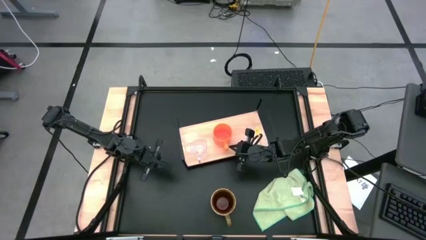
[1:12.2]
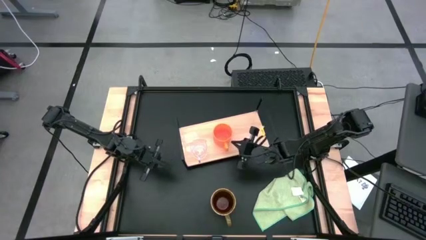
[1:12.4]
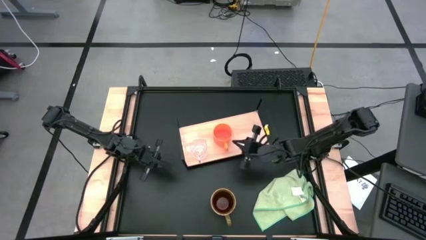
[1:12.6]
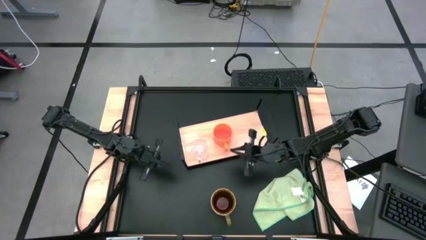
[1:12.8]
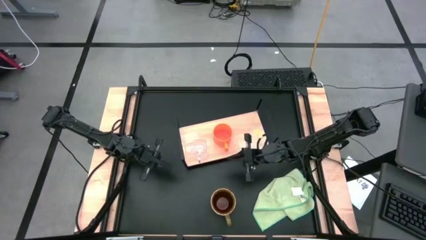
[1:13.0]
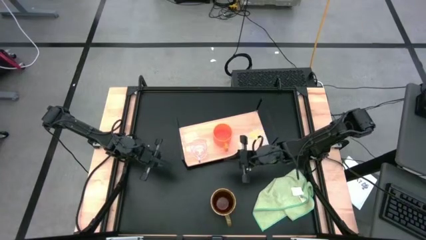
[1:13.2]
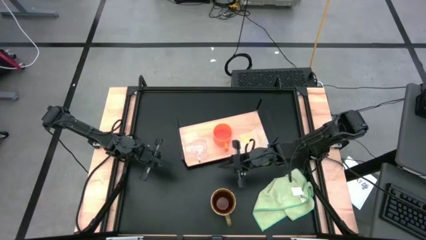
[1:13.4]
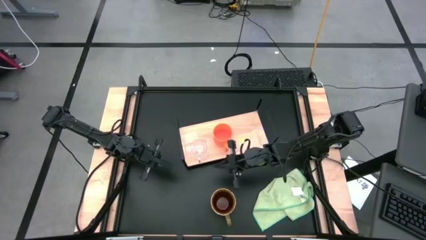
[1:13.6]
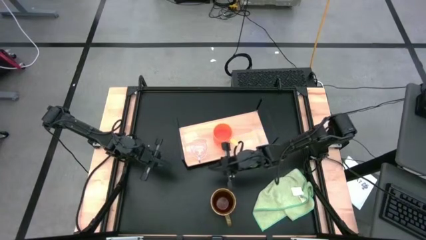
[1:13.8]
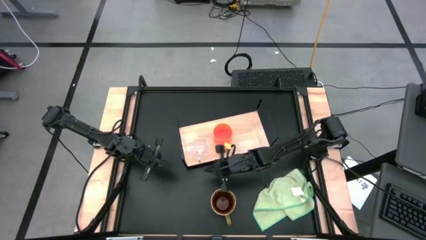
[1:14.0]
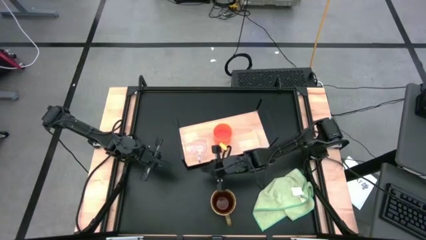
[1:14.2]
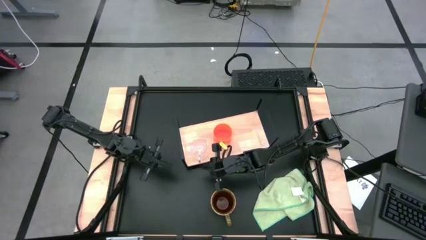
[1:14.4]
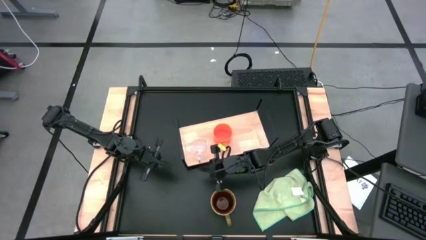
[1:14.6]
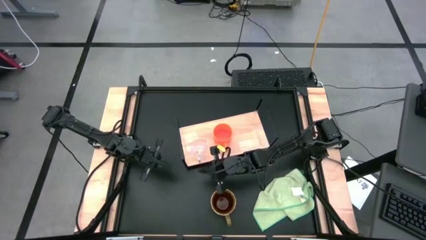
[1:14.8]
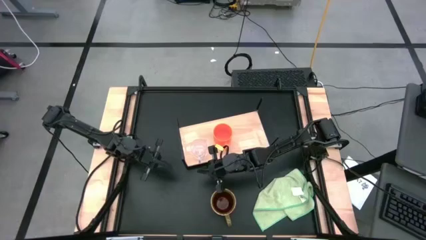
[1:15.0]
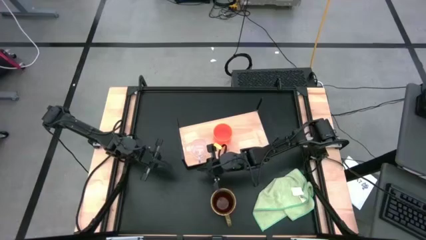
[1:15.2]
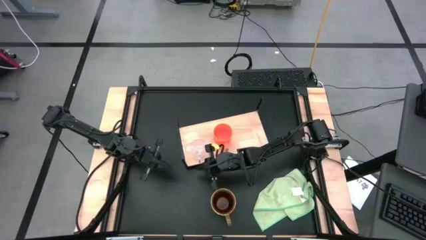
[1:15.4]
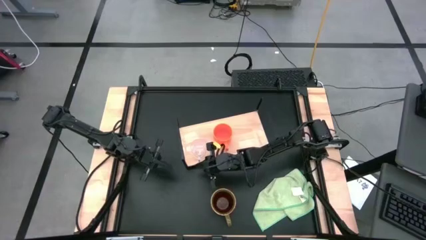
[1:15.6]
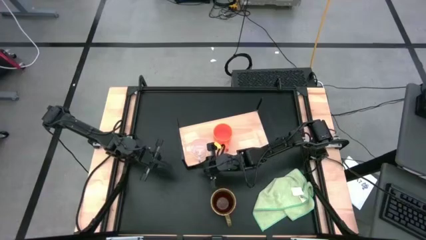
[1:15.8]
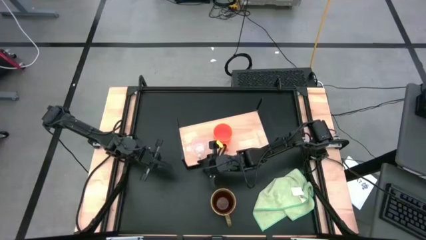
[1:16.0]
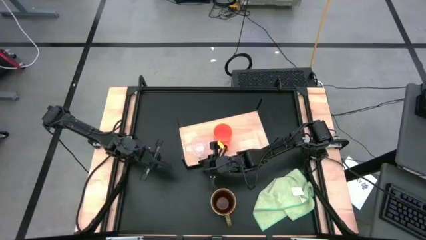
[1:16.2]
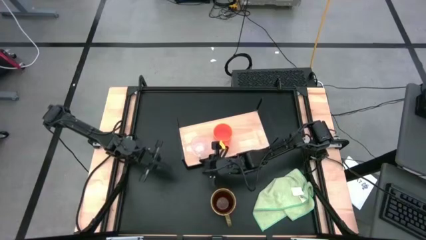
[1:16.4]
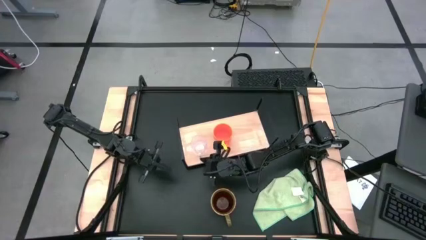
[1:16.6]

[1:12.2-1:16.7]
Task: Stack small to large cups/mugs on shelf
Adjust the transparent mug

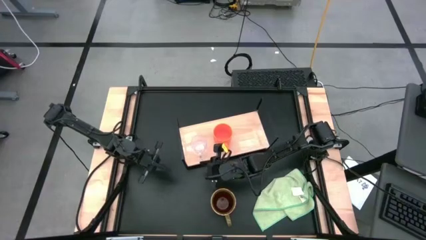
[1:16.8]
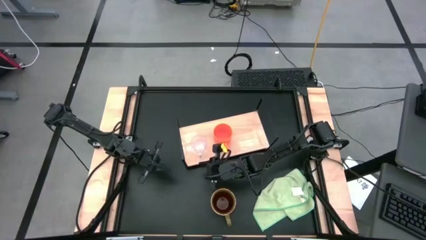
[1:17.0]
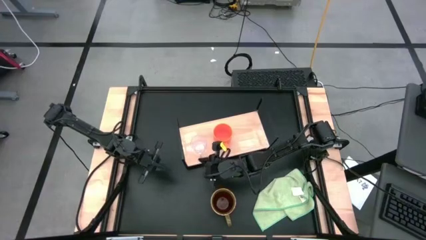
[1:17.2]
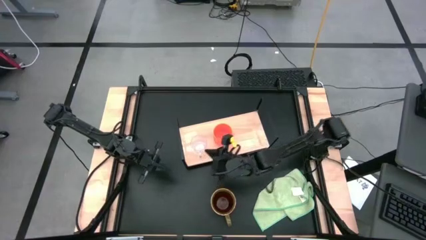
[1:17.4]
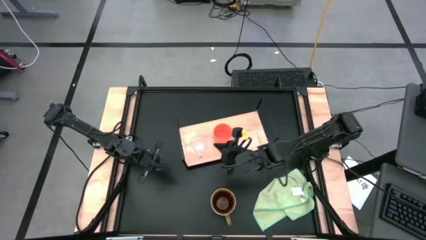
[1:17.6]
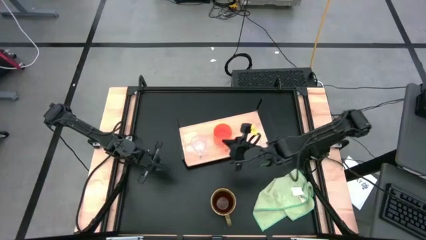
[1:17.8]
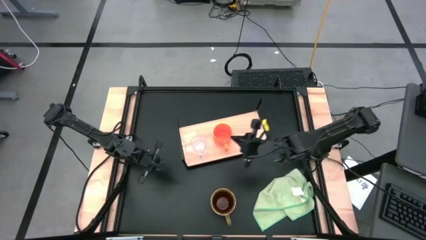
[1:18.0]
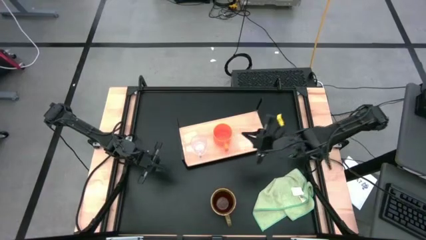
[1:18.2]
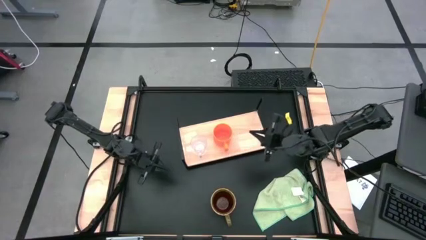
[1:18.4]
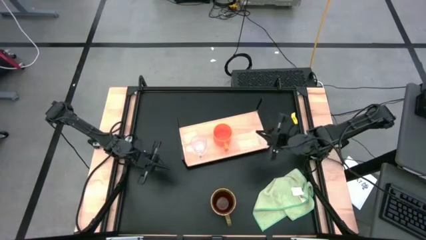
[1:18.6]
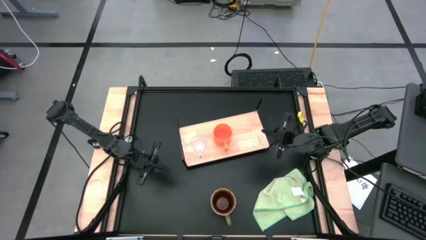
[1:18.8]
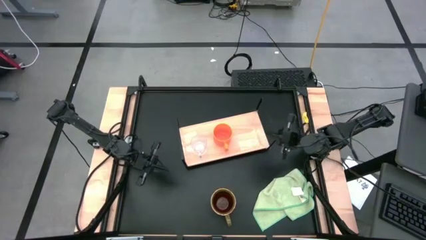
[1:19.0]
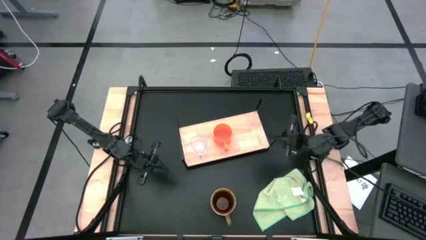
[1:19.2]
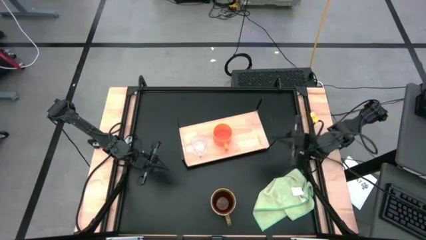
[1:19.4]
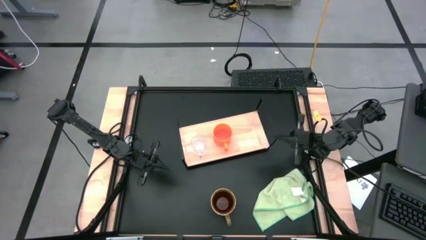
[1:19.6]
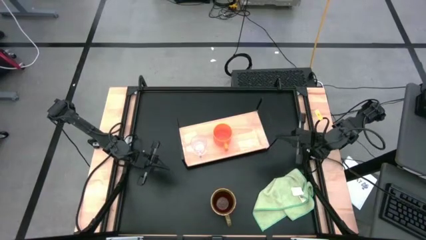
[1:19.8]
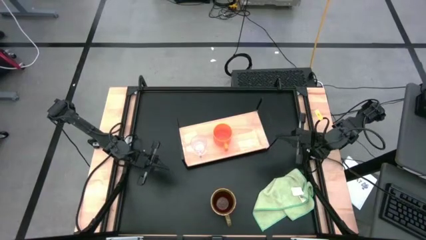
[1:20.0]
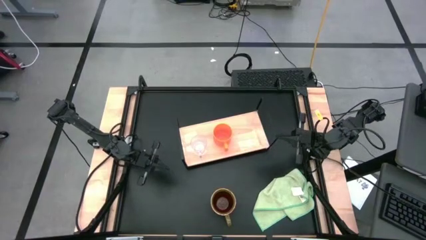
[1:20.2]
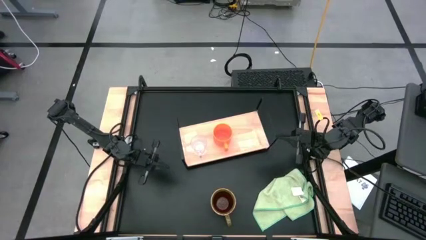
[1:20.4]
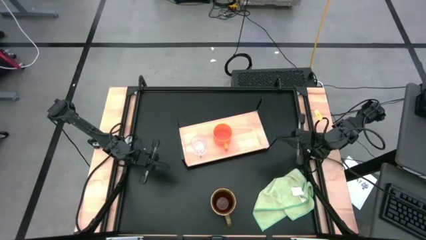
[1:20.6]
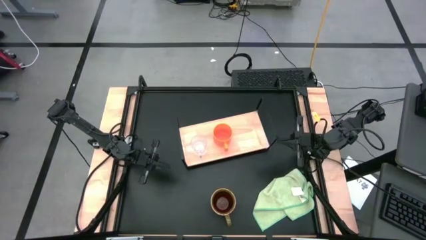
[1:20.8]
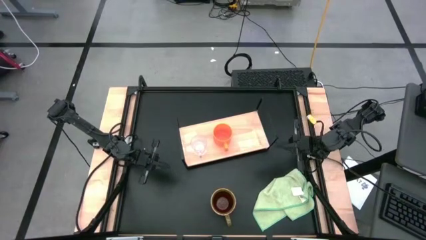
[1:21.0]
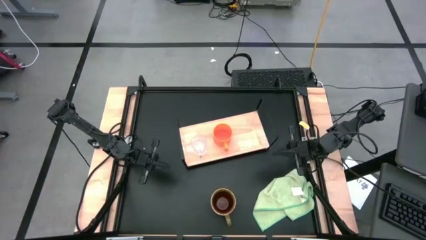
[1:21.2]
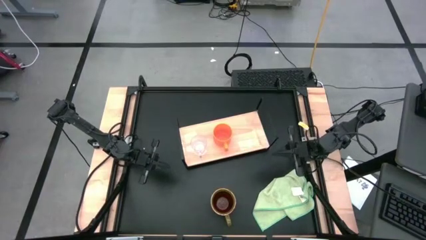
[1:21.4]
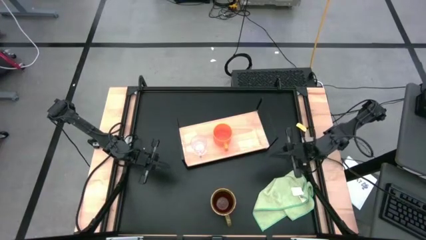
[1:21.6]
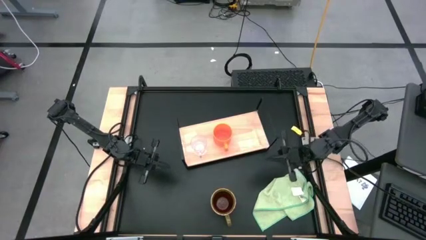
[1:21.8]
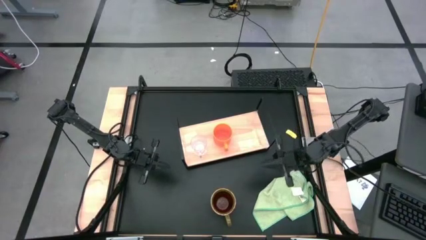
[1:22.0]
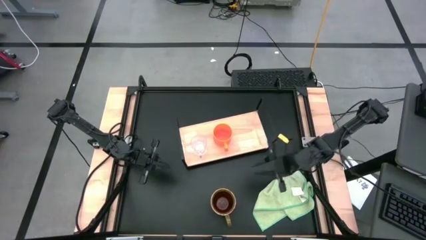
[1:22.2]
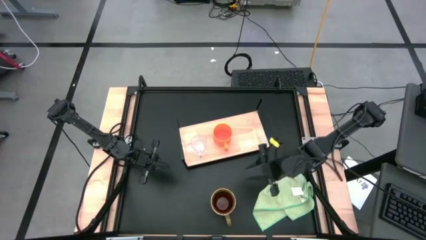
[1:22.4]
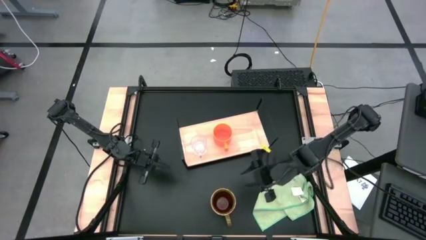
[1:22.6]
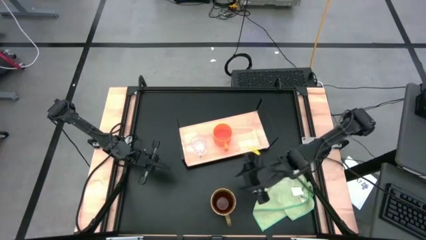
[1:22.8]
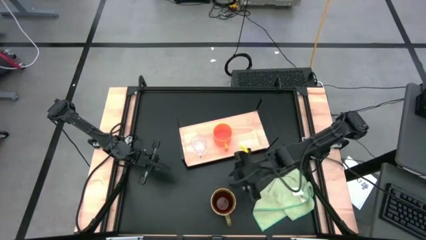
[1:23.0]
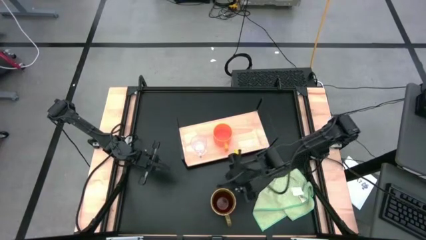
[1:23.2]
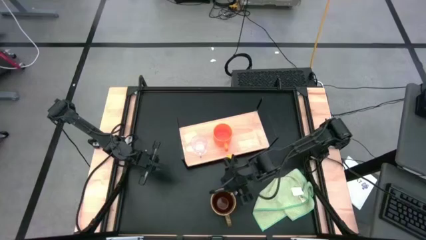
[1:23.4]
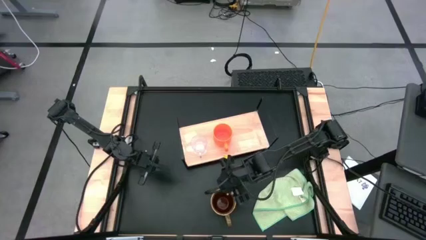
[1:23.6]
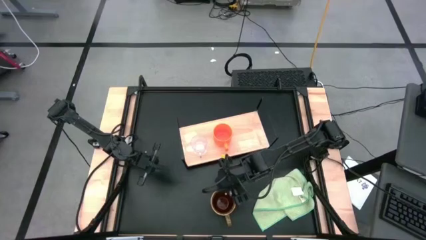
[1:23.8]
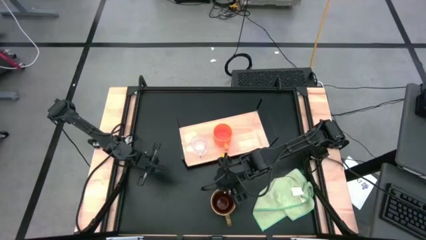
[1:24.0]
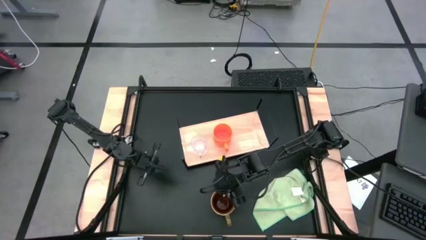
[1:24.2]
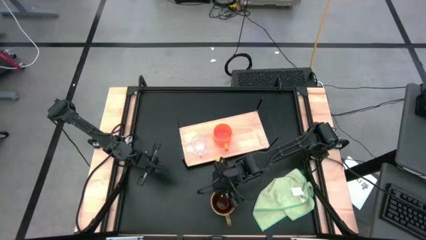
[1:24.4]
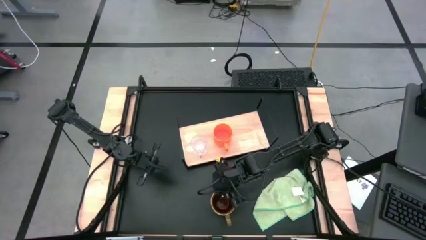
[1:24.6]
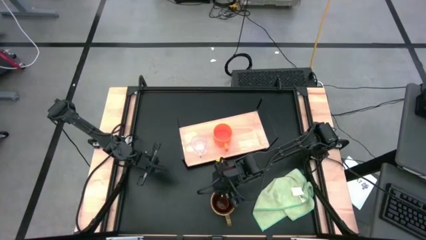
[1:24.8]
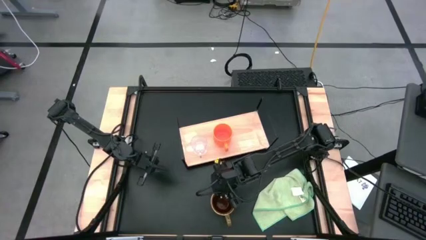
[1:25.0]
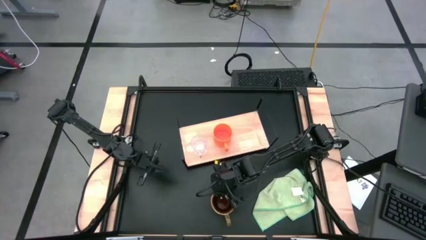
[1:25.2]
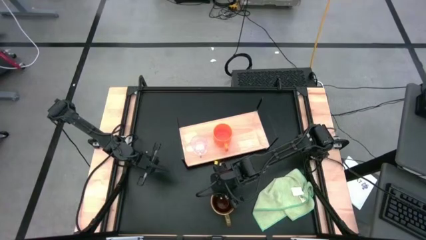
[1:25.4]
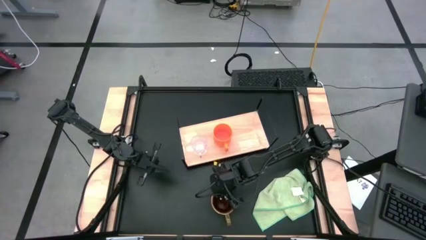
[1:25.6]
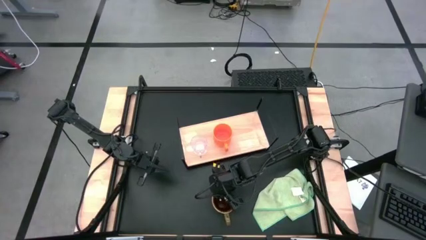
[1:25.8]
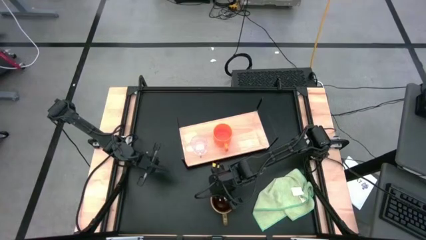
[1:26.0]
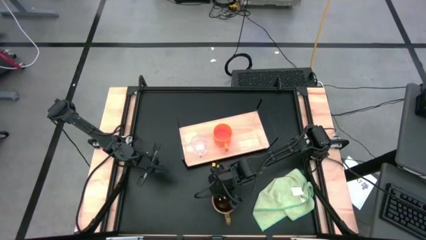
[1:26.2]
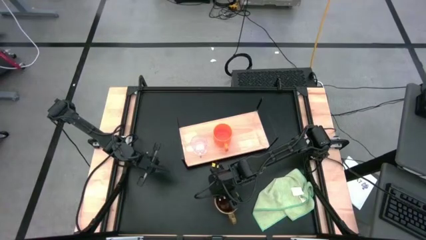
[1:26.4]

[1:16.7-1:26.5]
Put the green patterned mug on the shelf

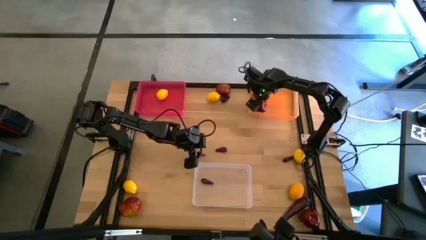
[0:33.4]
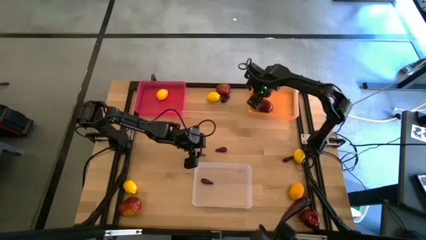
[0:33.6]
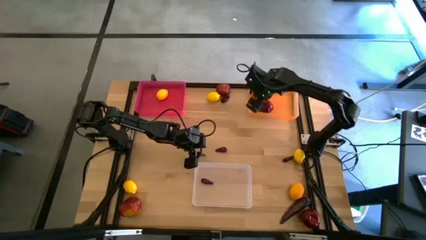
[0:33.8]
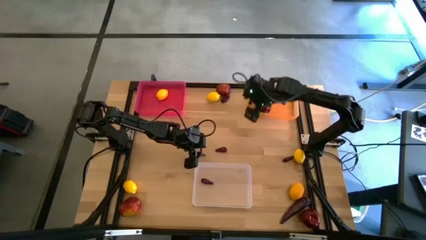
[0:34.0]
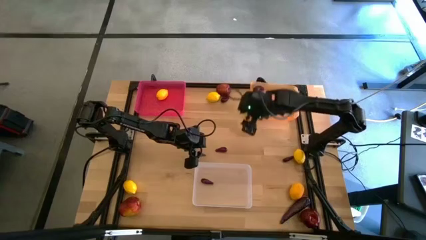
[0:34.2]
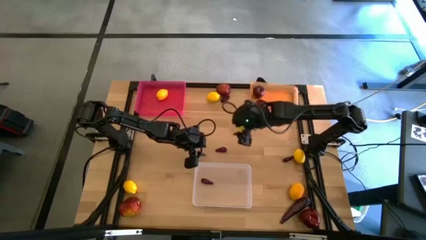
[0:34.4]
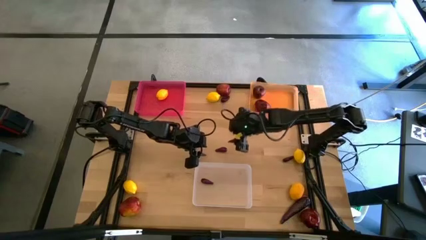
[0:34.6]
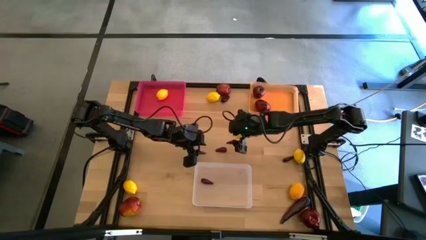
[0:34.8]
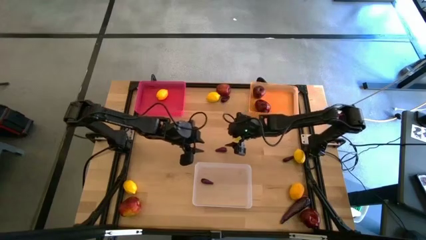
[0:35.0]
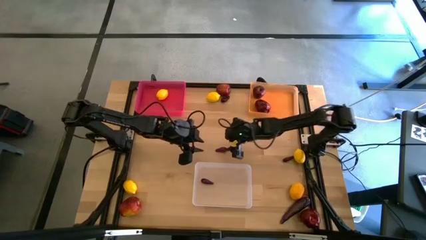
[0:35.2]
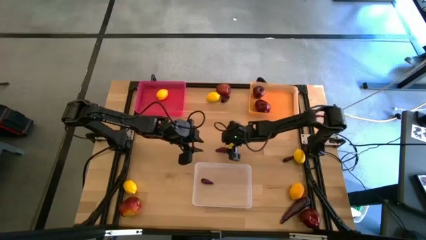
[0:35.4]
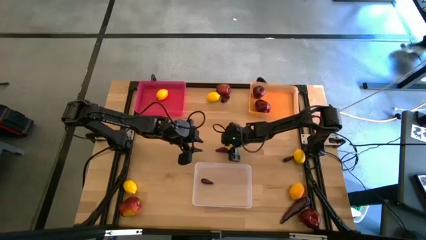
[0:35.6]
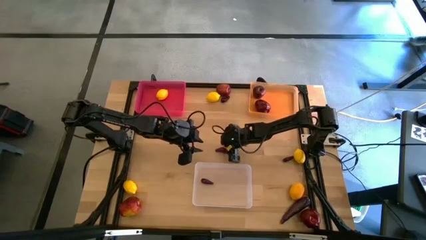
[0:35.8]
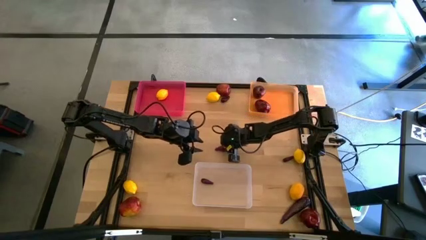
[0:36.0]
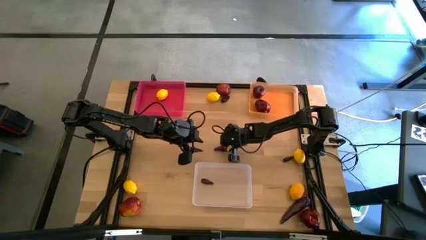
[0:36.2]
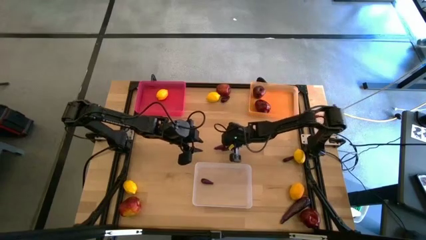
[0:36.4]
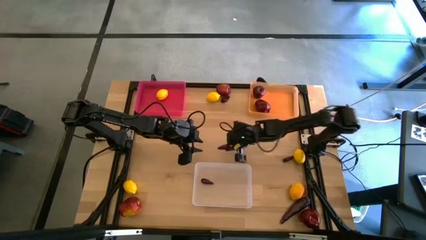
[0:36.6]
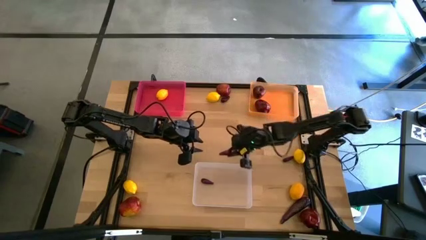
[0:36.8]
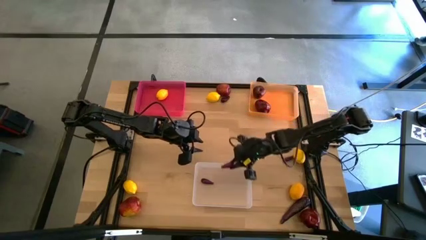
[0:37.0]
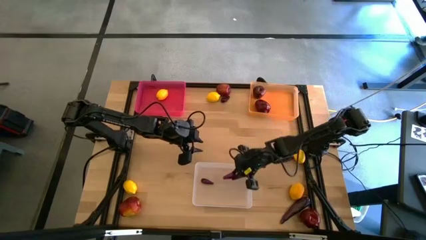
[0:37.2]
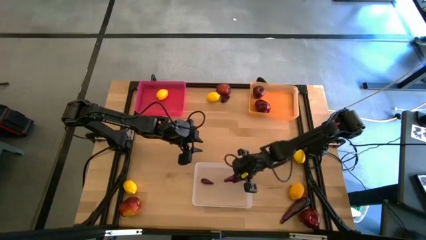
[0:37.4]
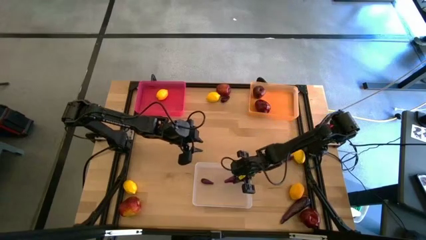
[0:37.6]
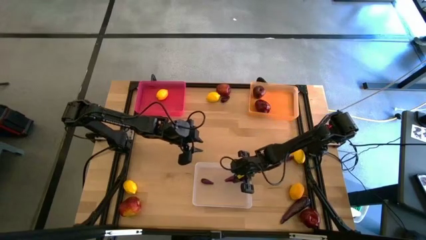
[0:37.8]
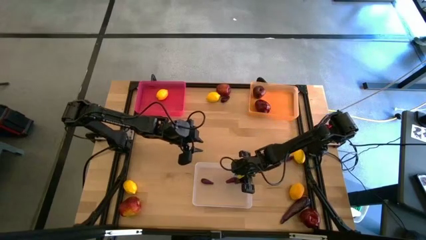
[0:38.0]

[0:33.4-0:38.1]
Task: Sort produce into baskets
Put the eggplant into the transparent bin
